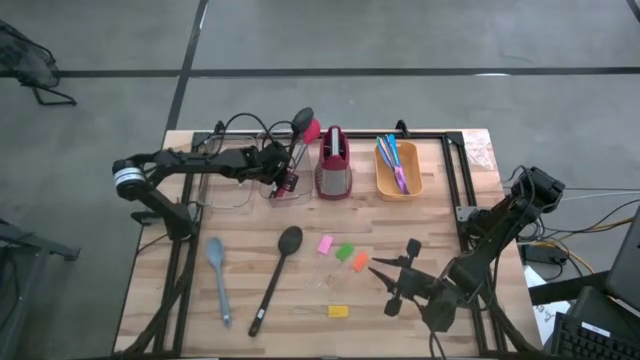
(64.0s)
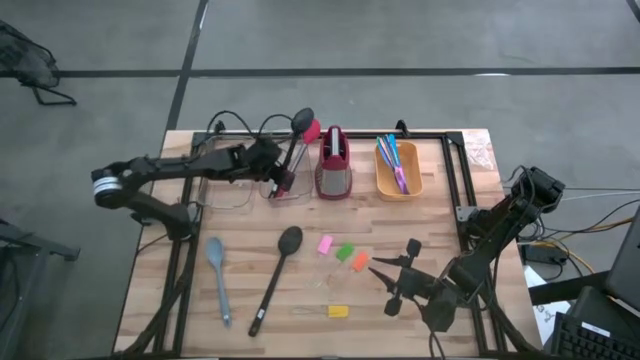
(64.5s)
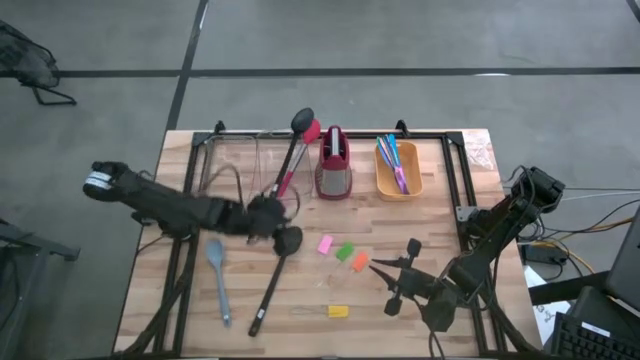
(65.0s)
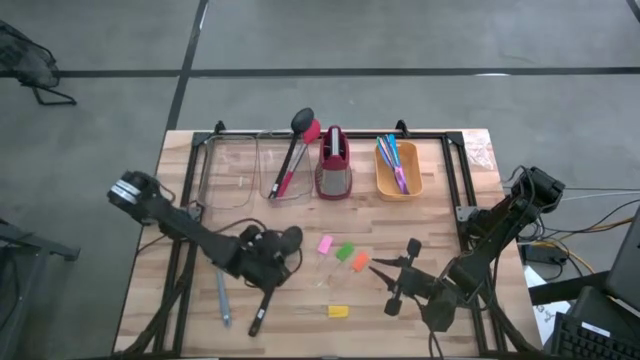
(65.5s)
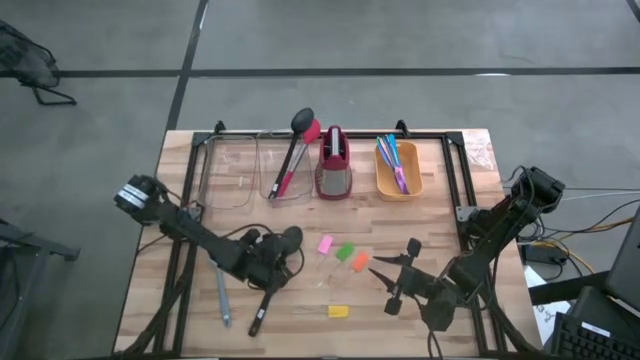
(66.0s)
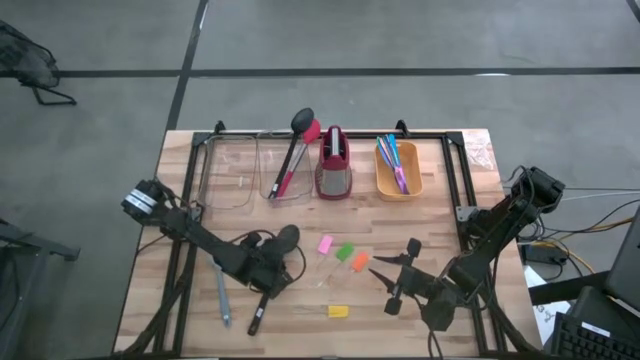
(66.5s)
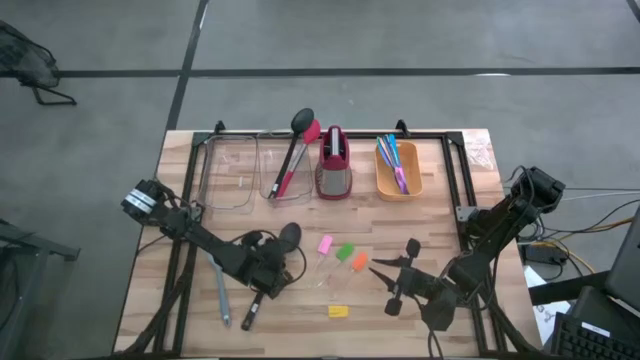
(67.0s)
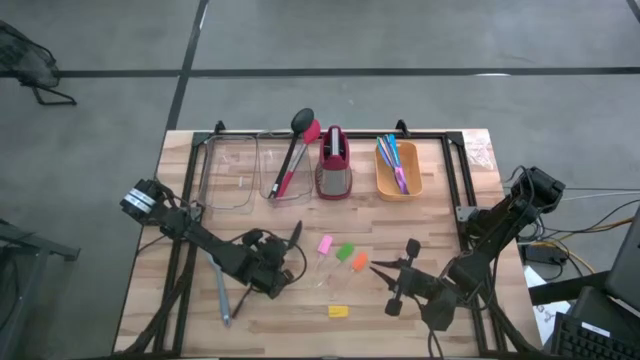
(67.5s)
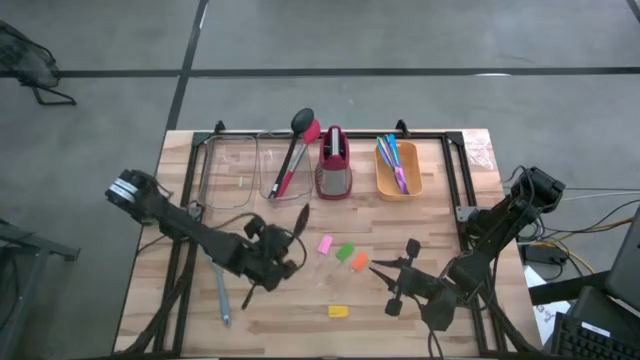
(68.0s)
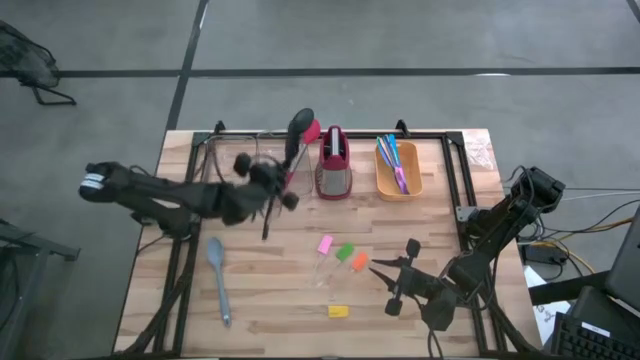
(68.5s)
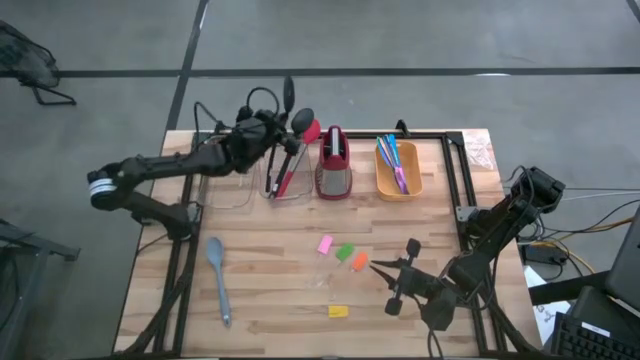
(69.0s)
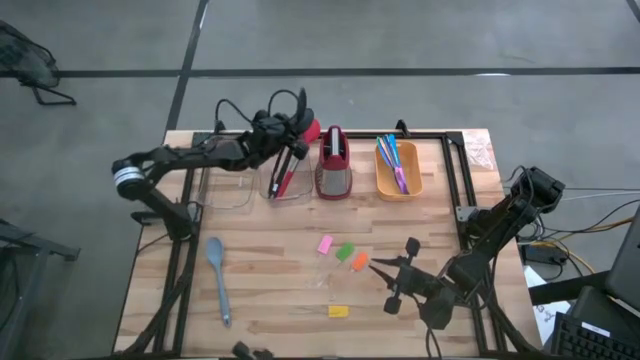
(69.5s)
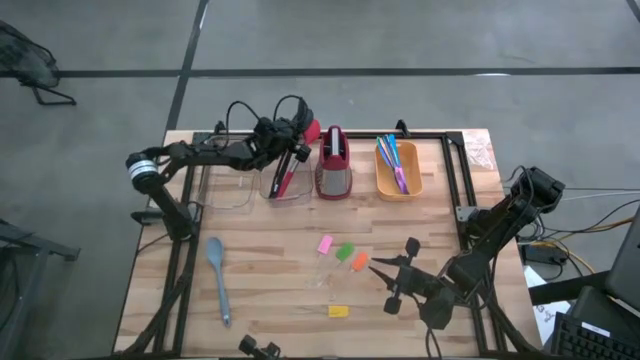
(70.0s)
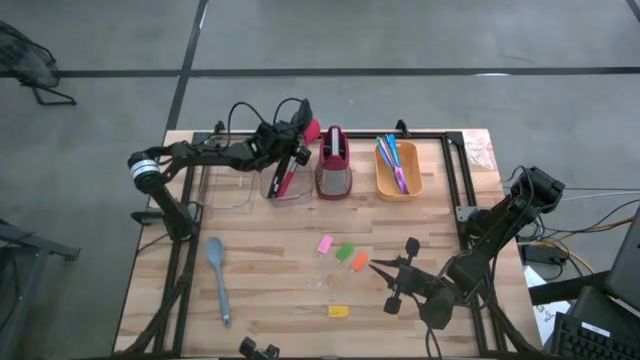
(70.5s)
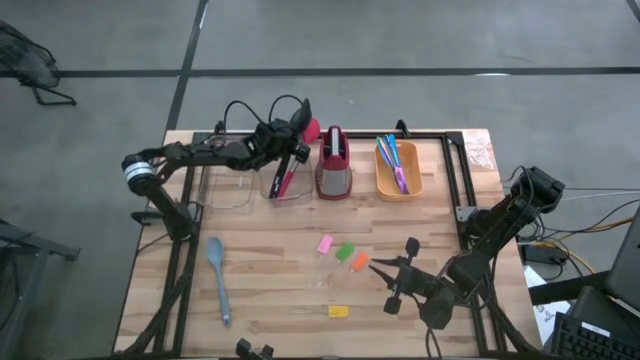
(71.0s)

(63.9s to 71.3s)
Task: Pick & Place Kitchen Items
Put the black serving spoon into the right transparent bin

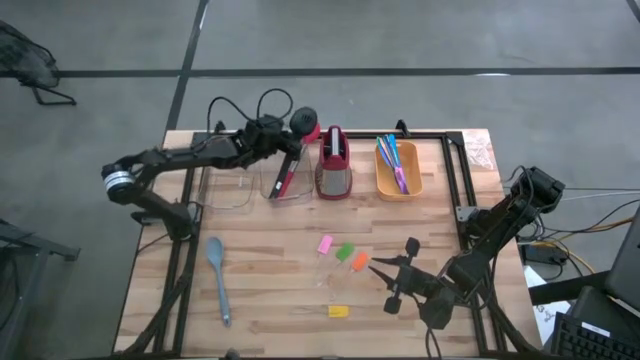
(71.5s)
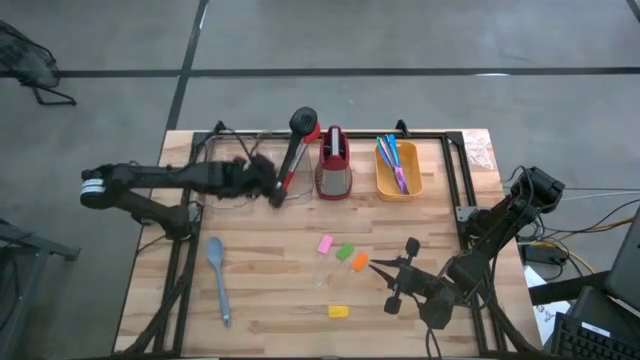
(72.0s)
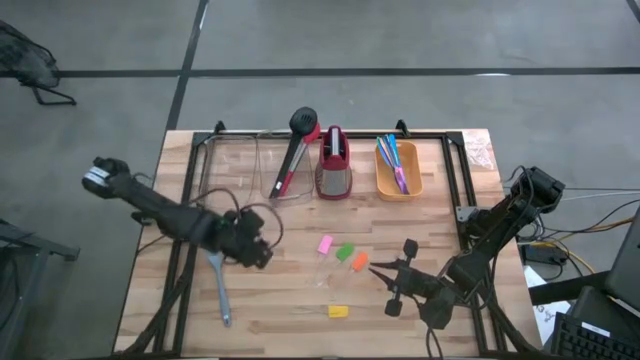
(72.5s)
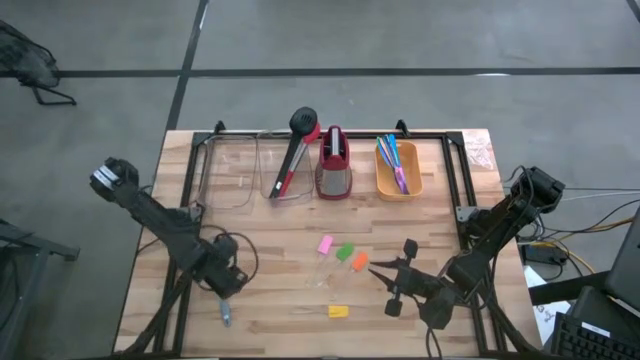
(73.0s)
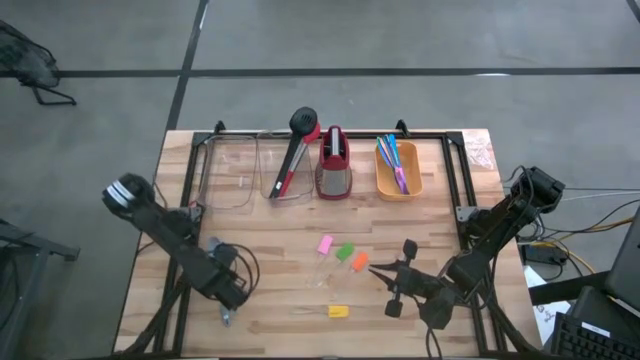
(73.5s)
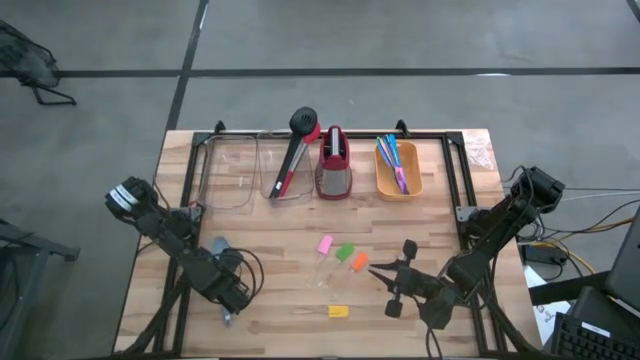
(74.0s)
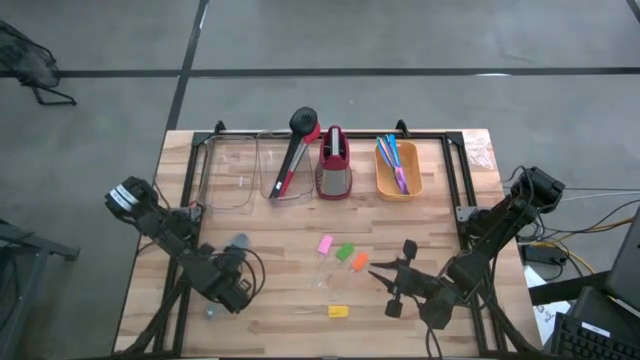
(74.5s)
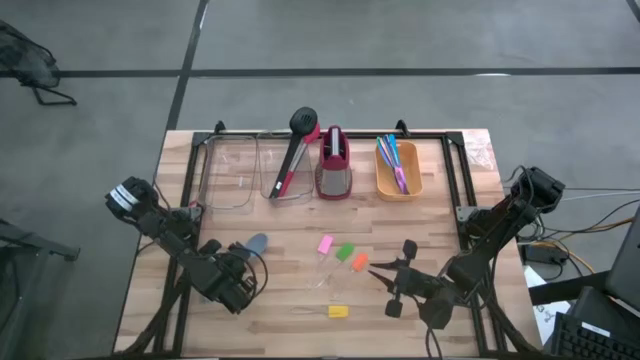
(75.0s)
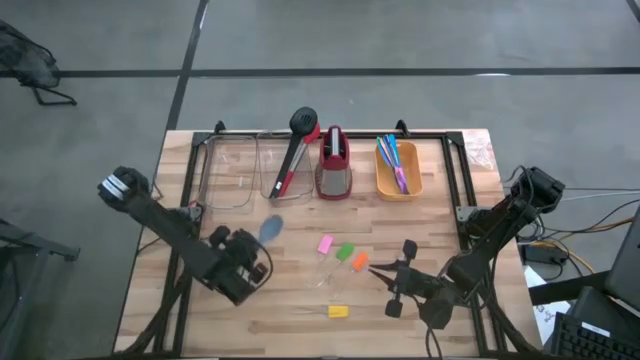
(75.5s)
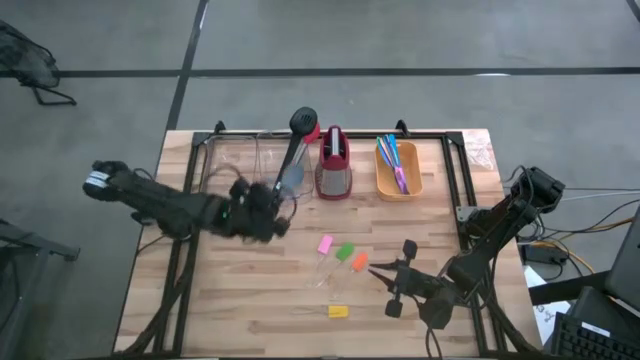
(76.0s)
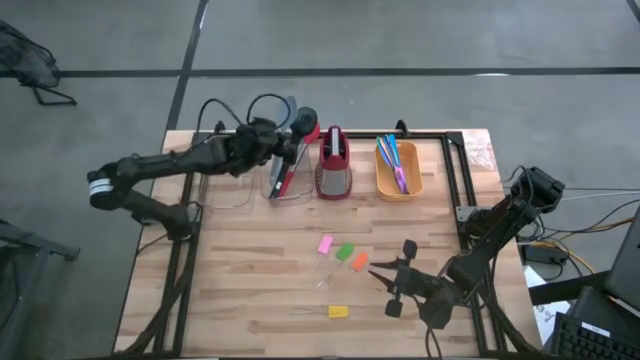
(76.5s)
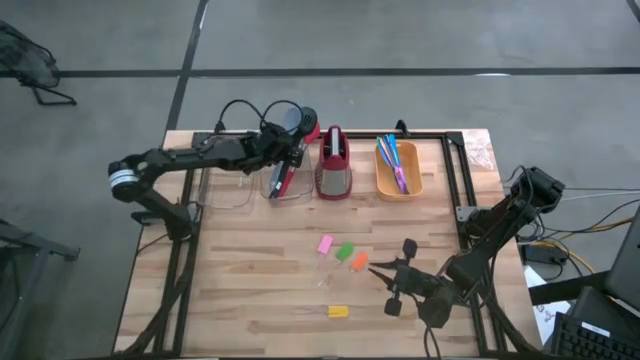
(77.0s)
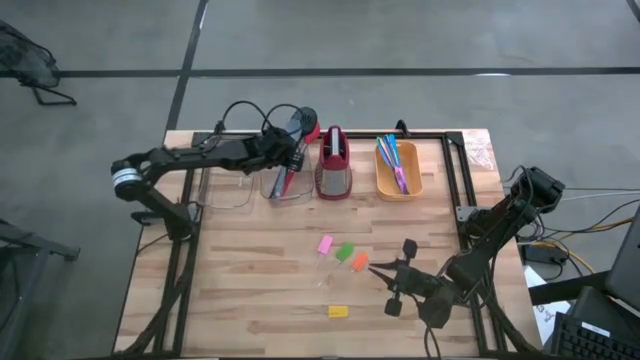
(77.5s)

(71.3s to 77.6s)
Put the blue serving spoon into the right transparent bin

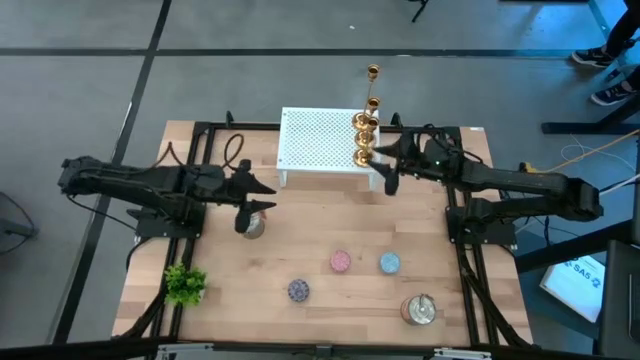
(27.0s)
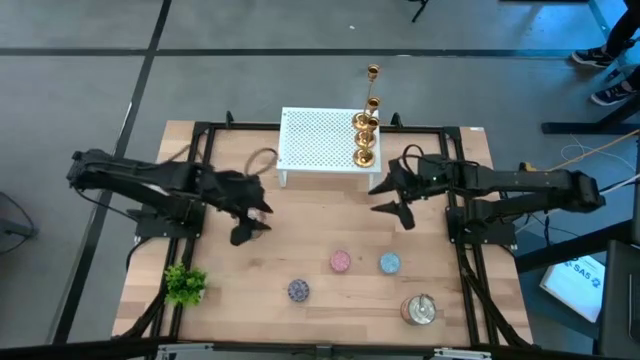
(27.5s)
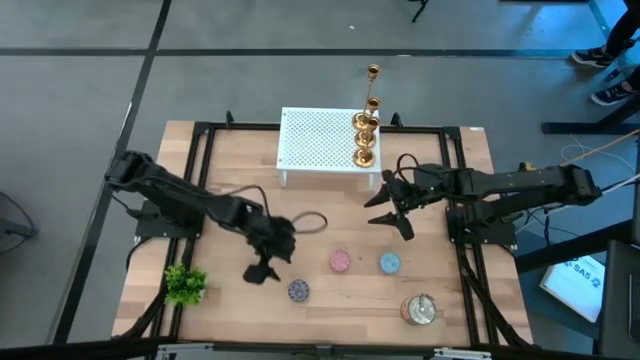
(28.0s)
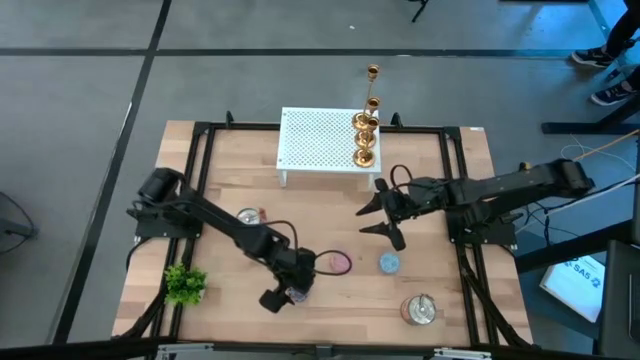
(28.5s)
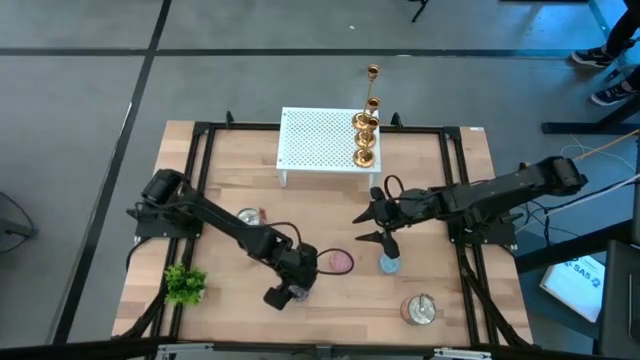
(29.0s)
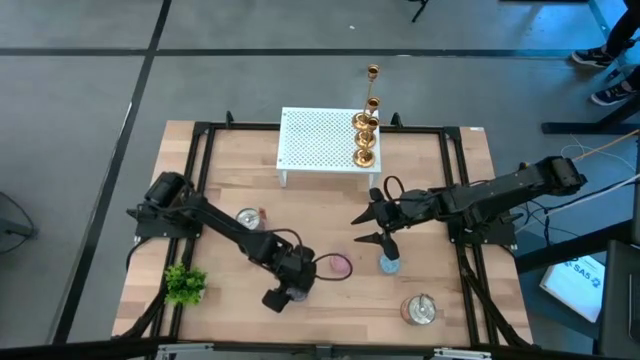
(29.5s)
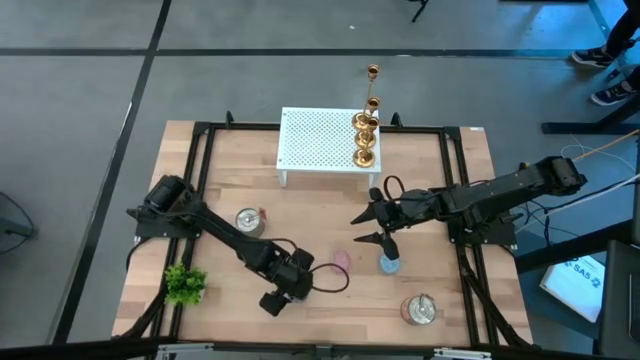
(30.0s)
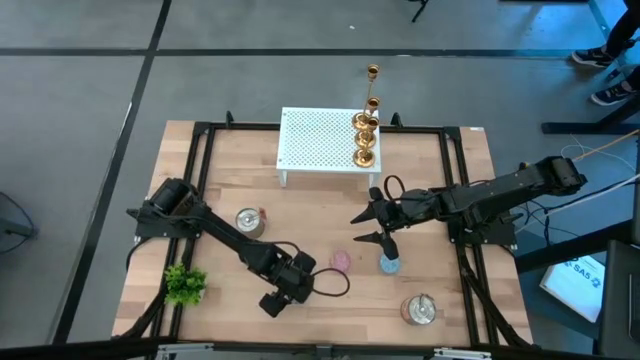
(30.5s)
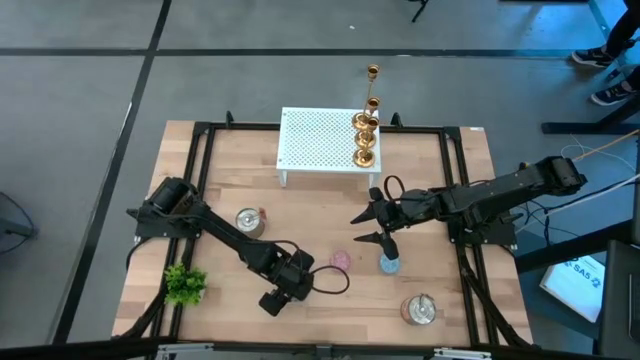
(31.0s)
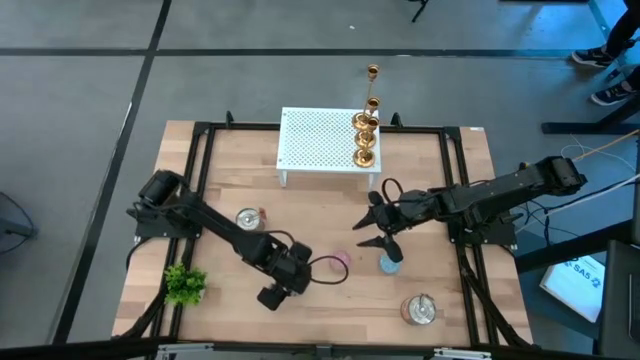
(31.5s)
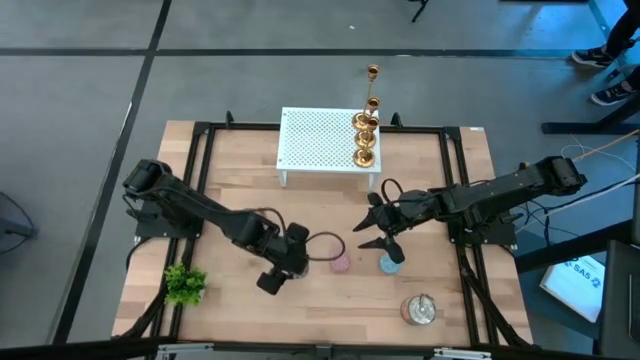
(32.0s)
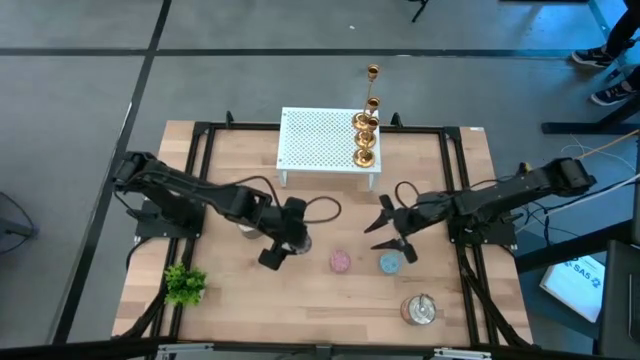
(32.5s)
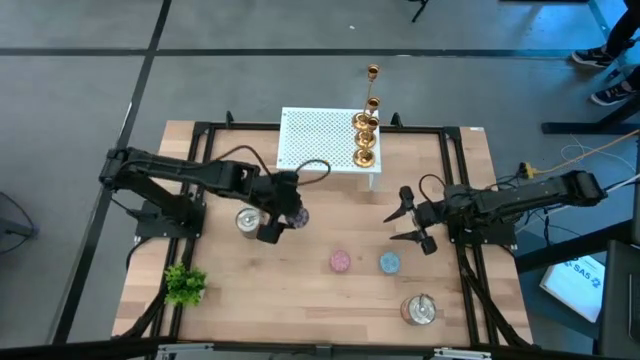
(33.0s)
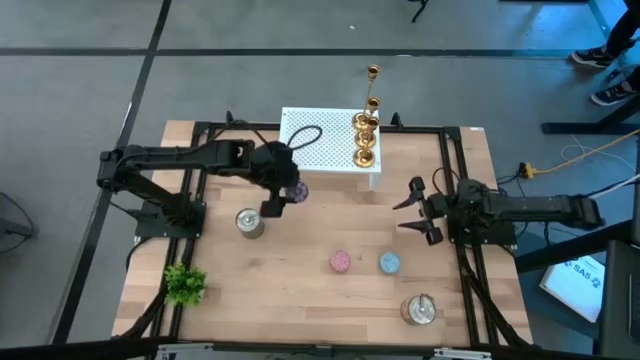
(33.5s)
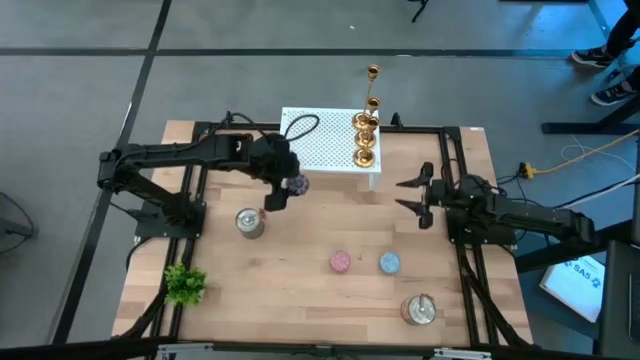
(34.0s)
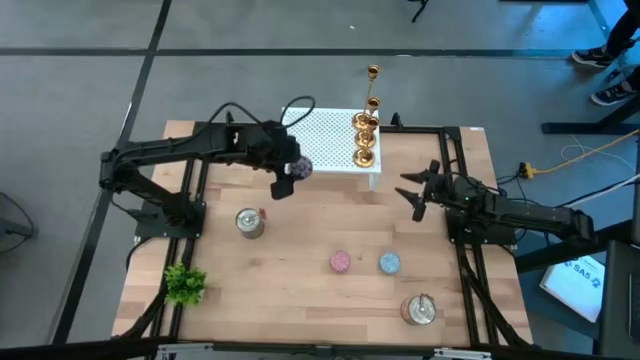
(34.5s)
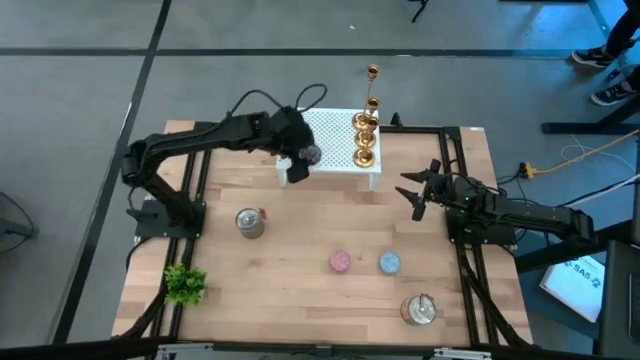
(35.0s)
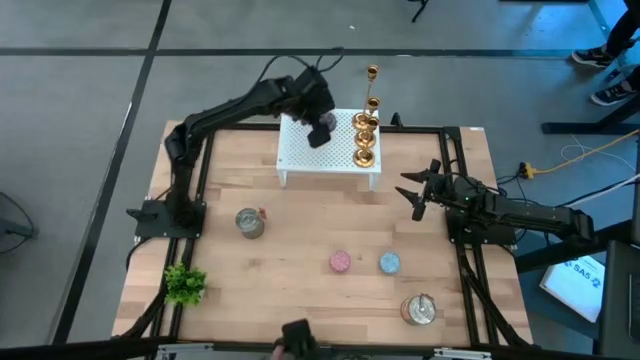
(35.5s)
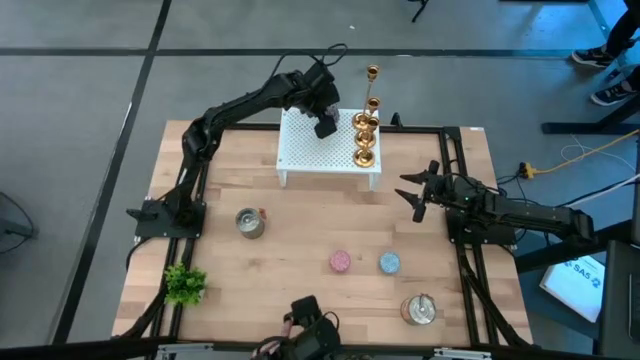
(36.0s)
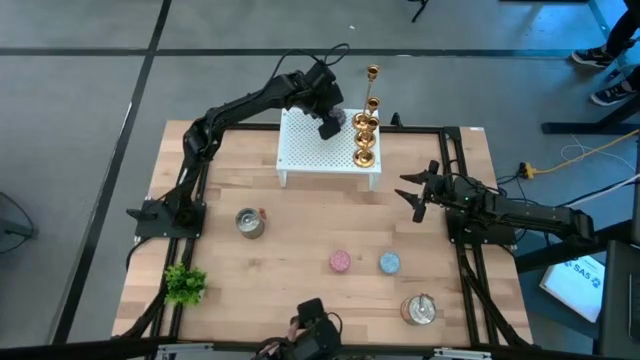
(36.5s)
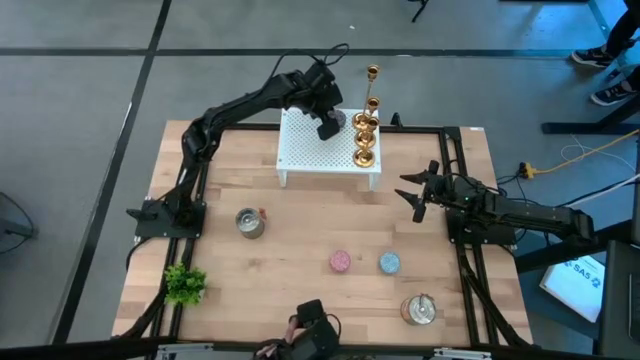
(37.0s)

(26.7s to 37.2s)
Task: Pick & Place candle stick holders
Put the small red scented candle on the shelf
